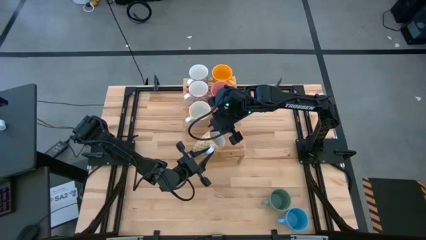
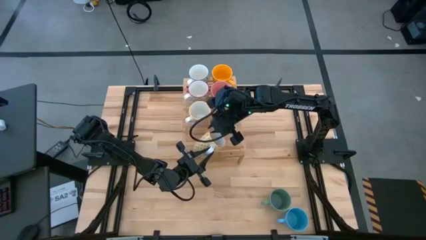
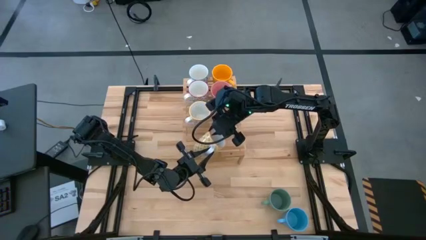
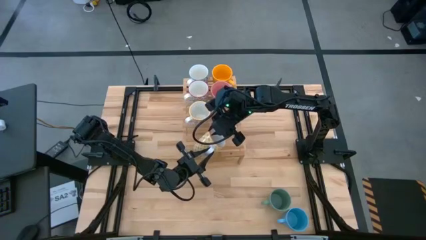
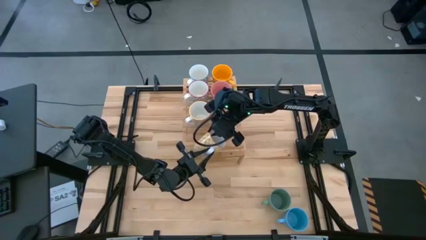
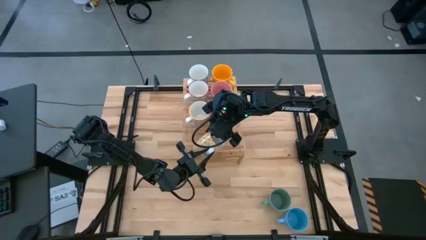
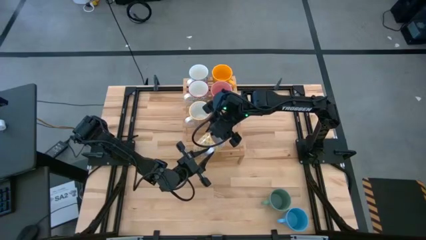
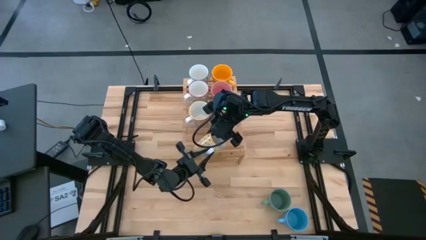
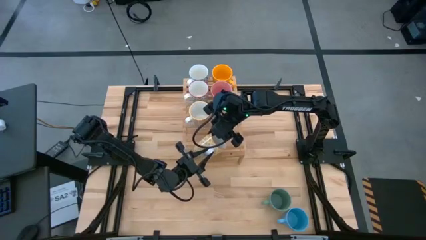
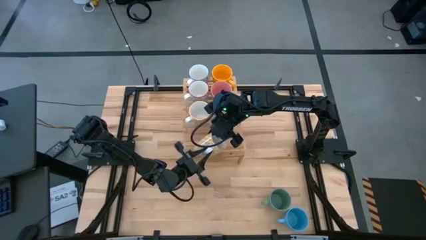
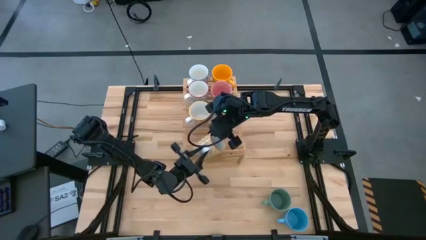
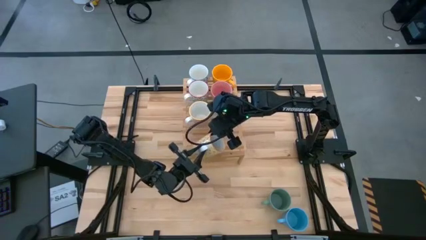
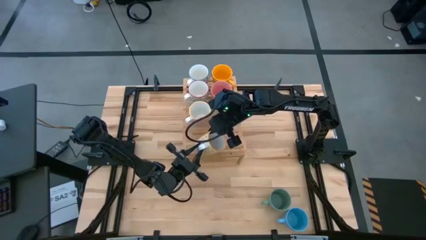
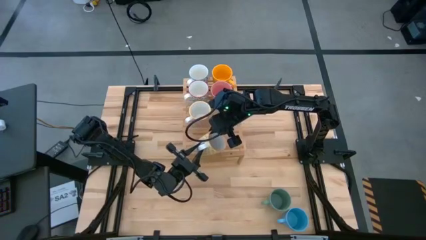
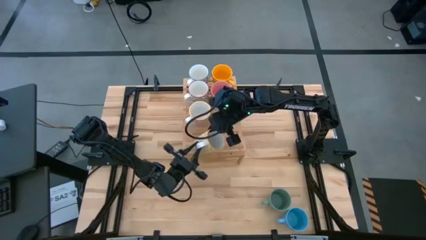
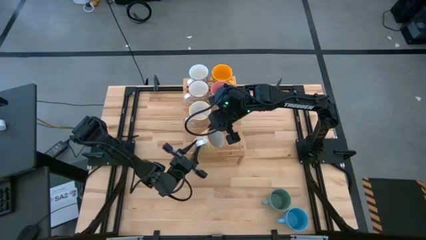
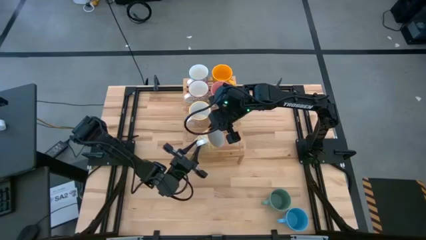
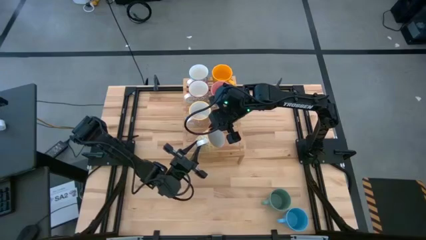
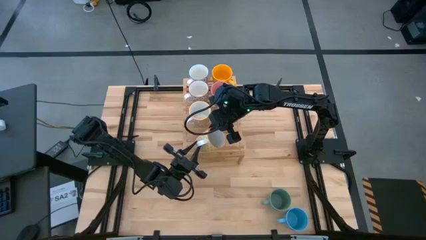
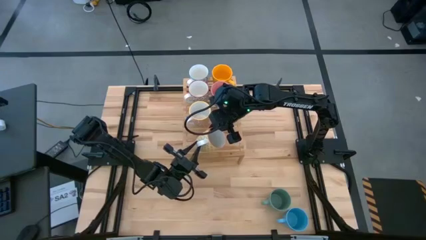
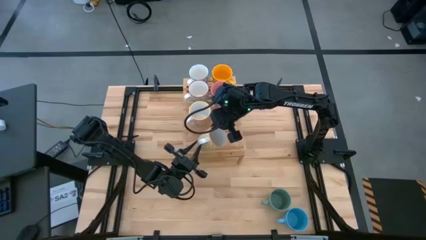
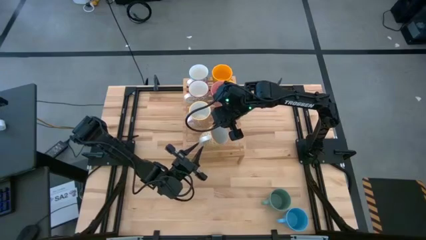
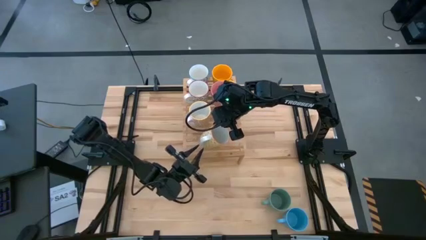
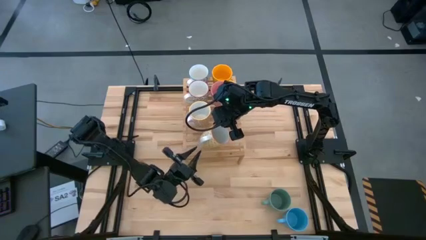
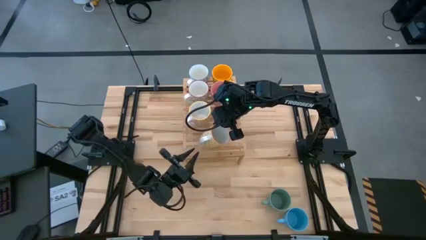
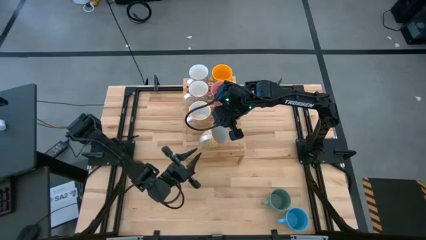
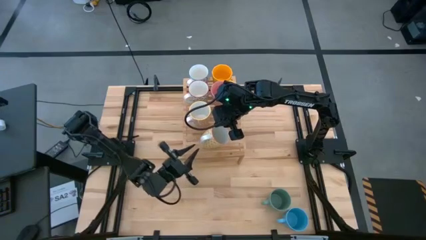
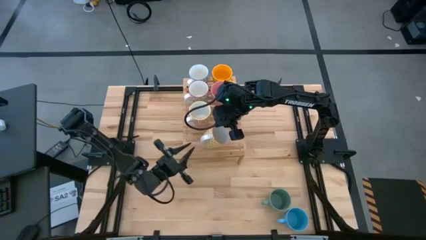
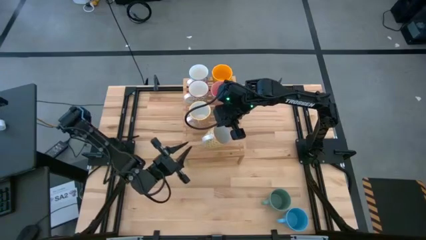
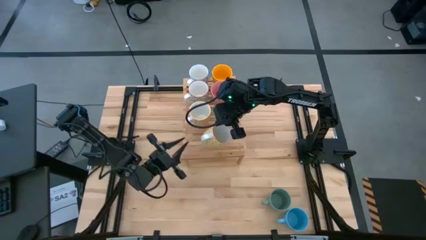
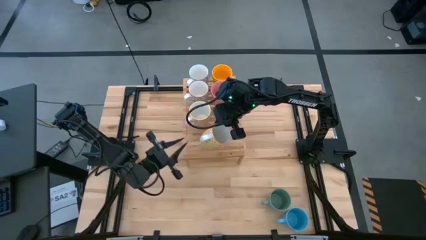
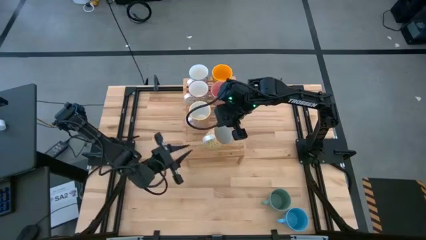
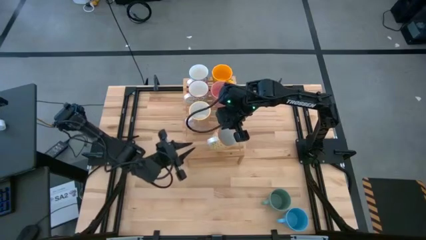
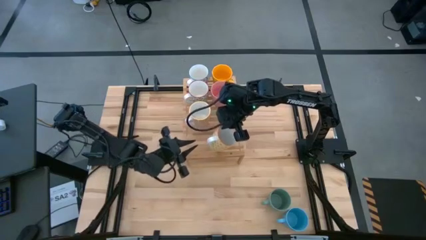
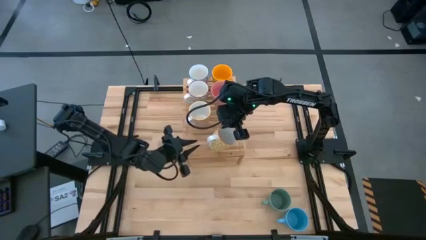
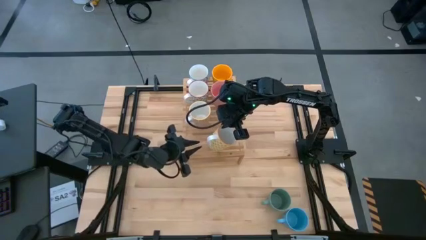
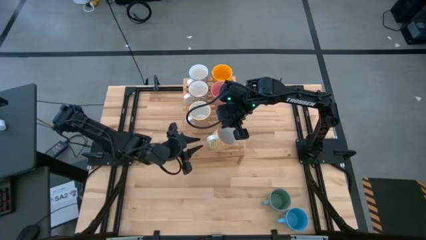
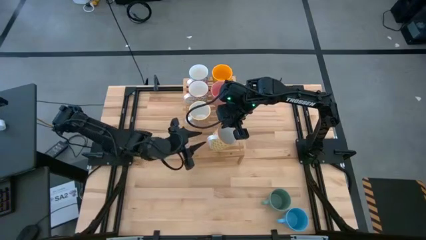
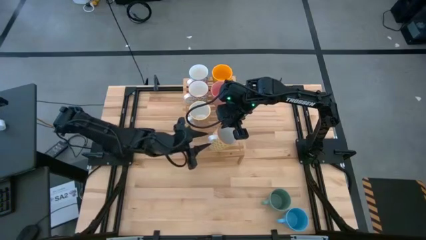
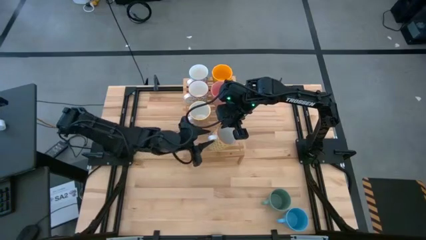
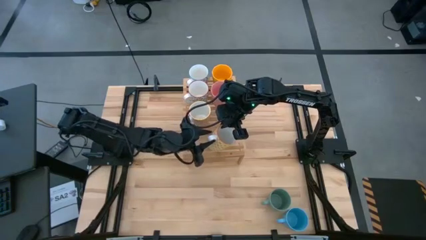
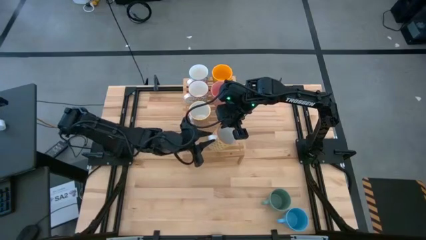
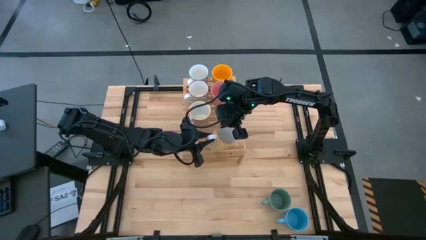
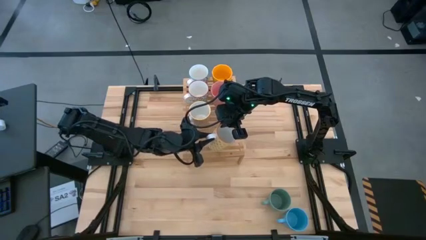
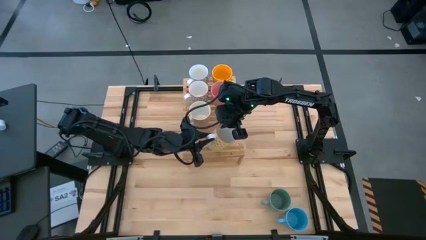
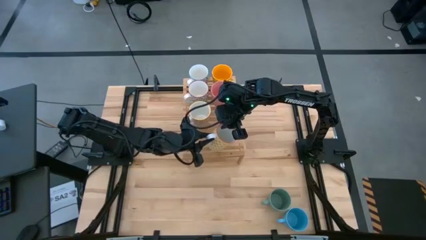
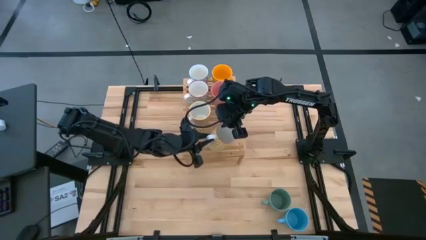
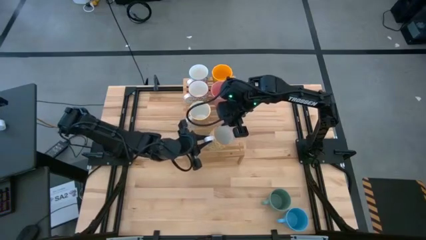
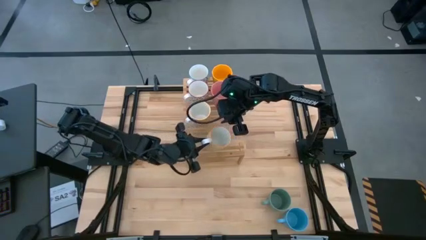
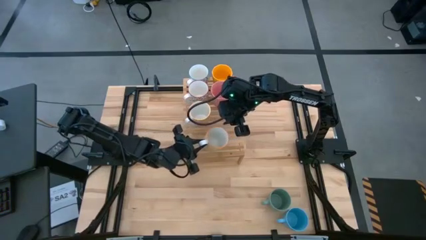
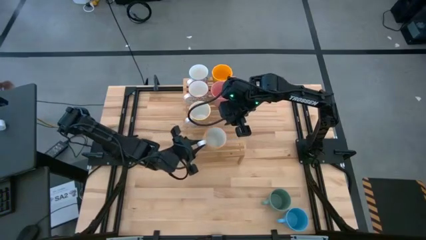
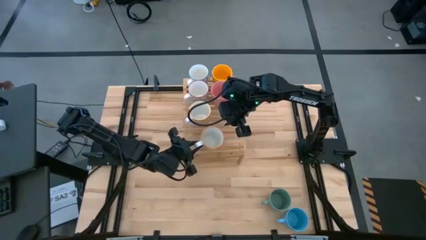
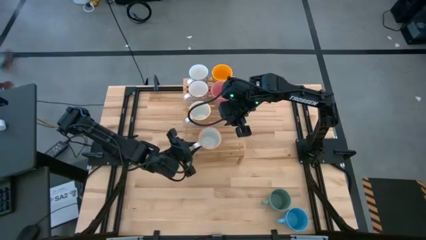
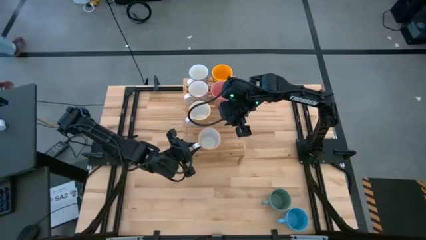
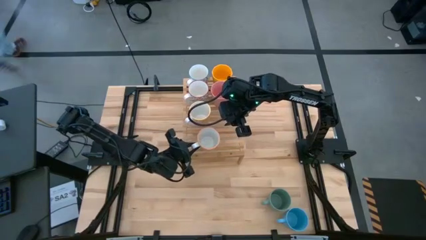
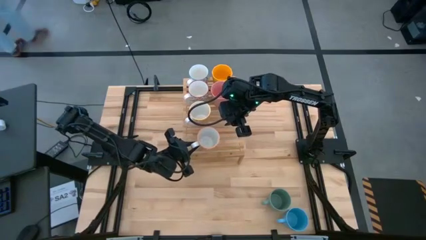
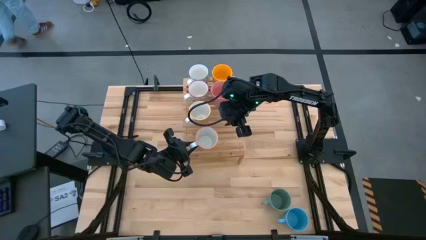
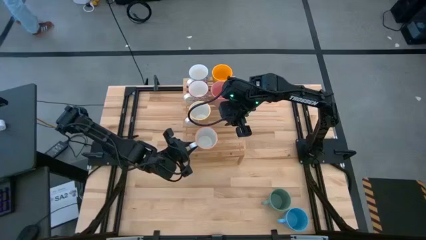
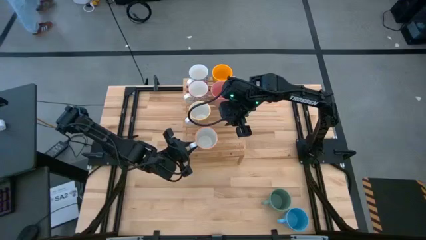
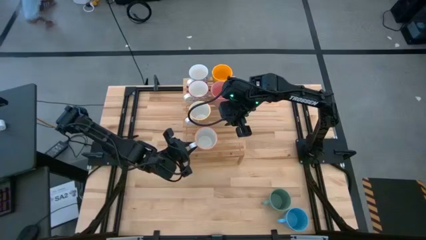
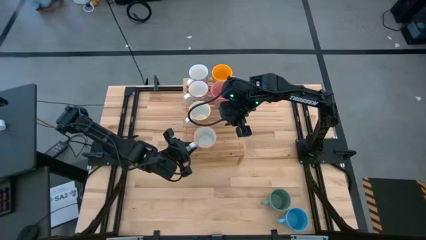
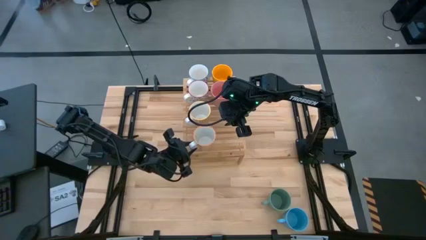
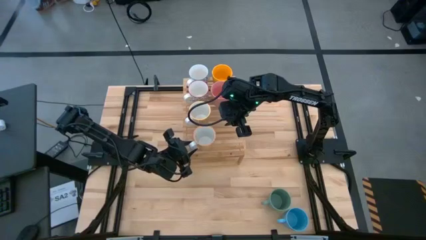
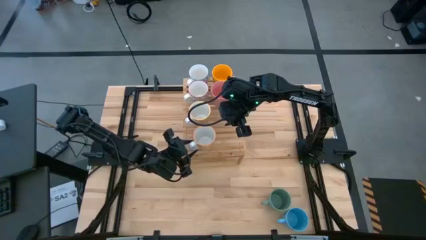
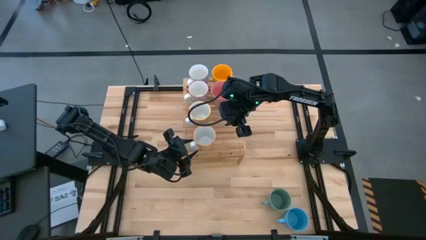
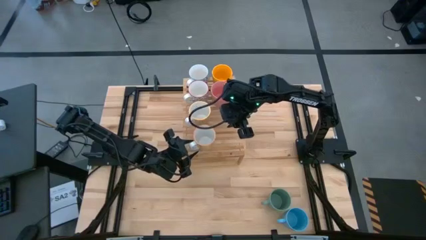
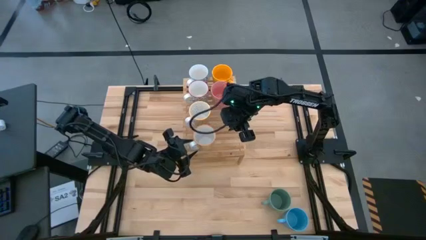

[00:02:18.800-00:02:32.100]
Task: Place coffee mugs
Put the yellow cup on the shelf aligned with the other orange cup

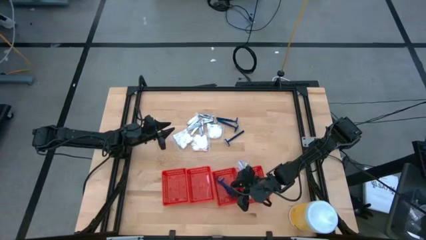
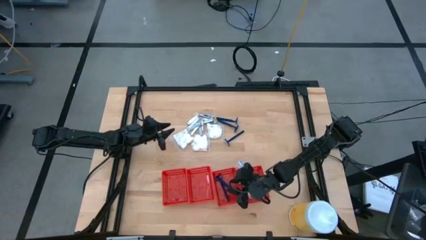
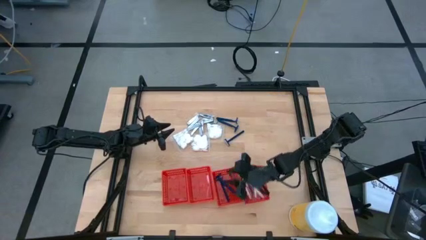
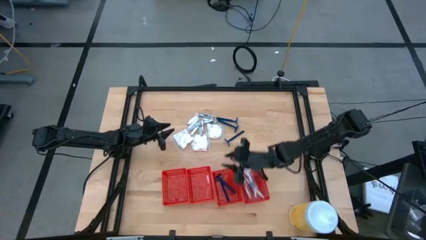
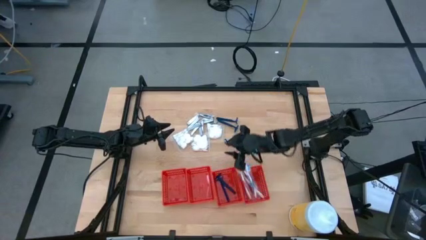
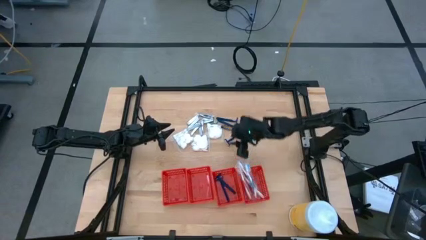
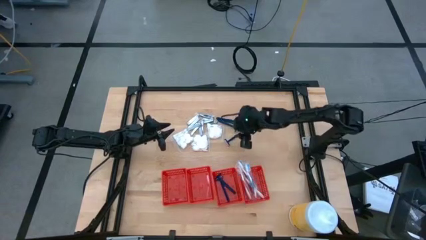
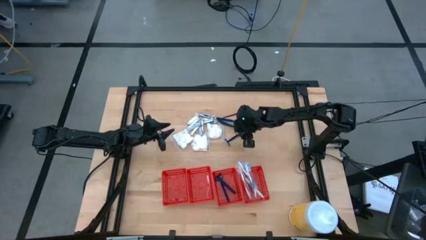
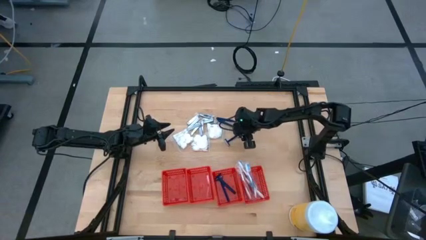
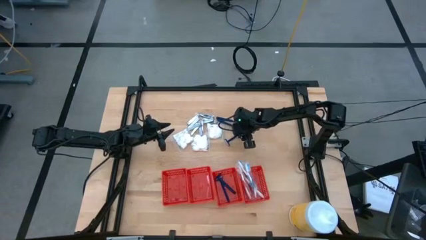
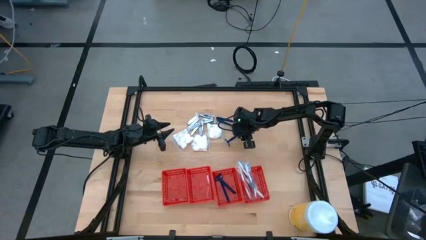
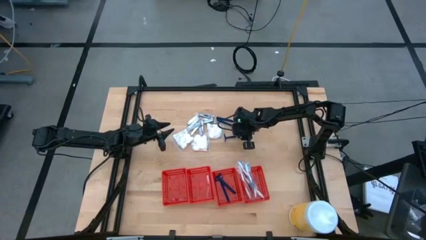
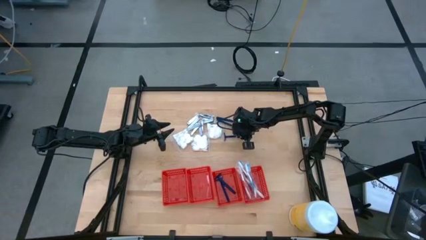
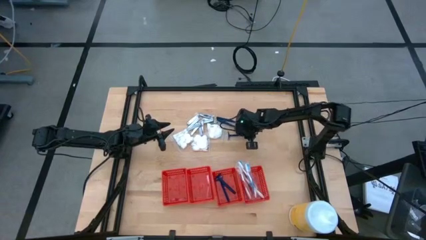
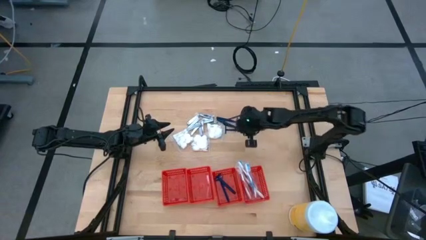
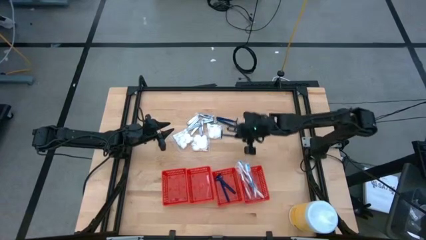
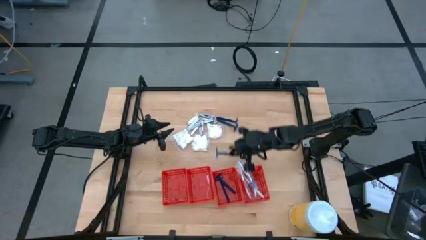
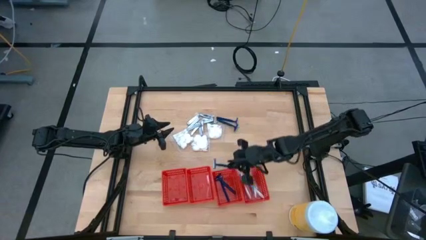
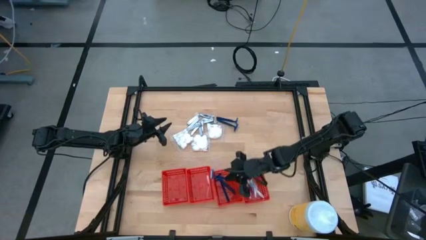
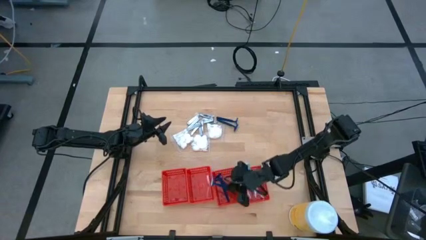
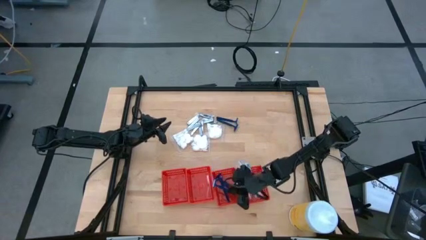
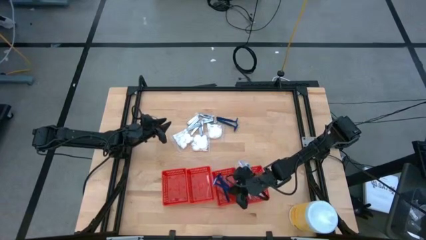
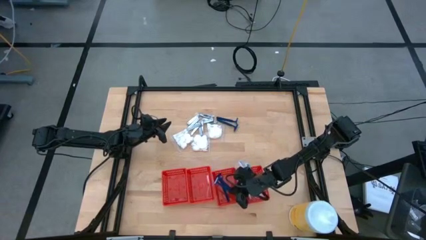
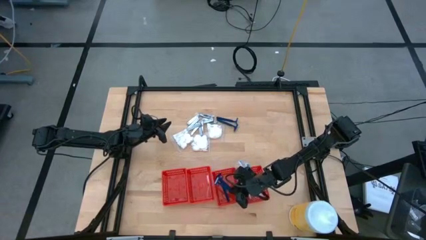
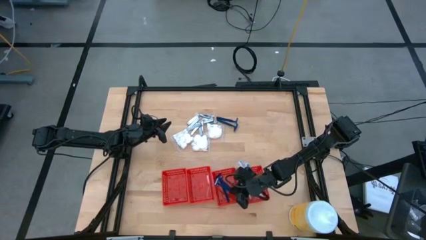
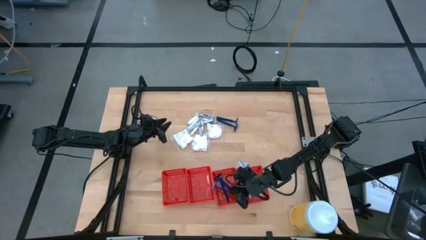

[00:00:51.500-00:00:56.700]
Task: Pick & Place Travel size toiletries
Put the blue razor into the middle right red bin
